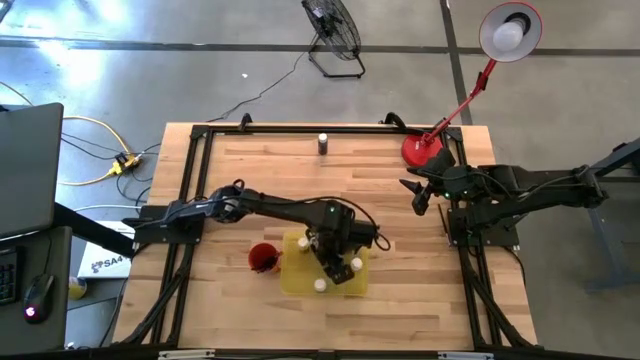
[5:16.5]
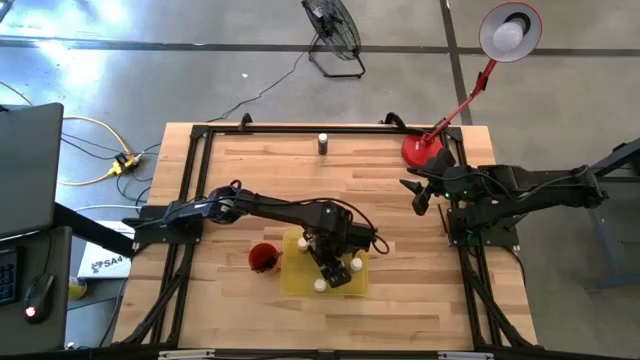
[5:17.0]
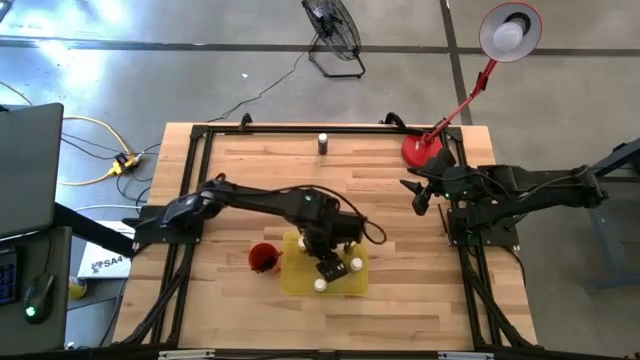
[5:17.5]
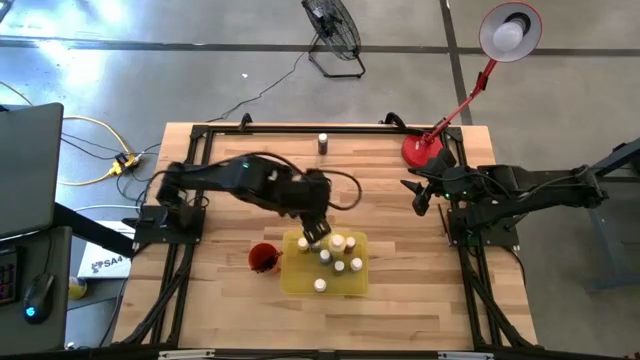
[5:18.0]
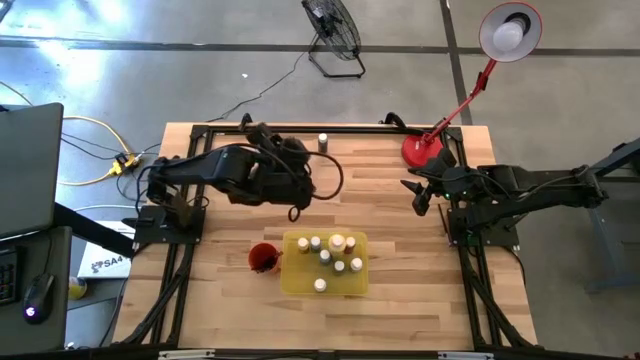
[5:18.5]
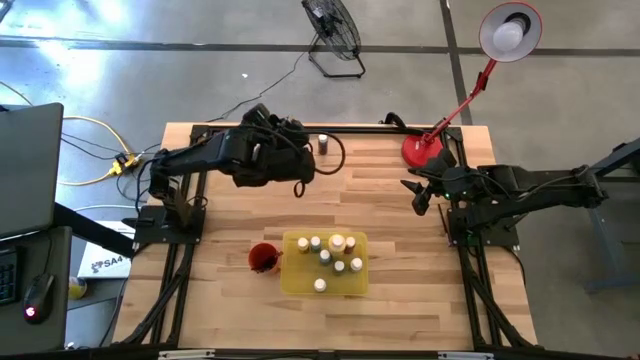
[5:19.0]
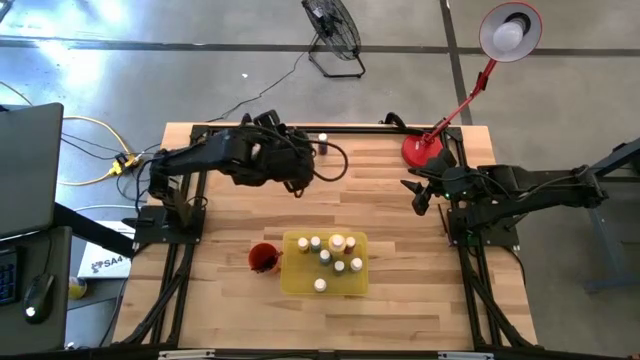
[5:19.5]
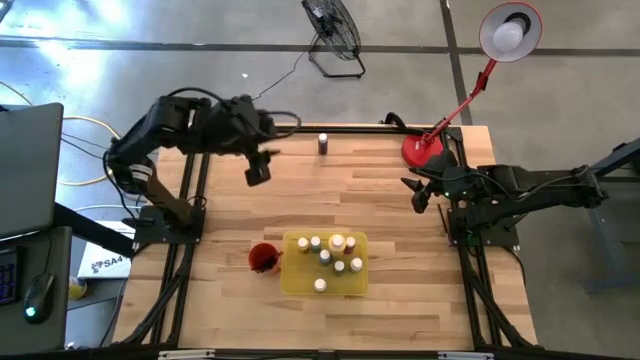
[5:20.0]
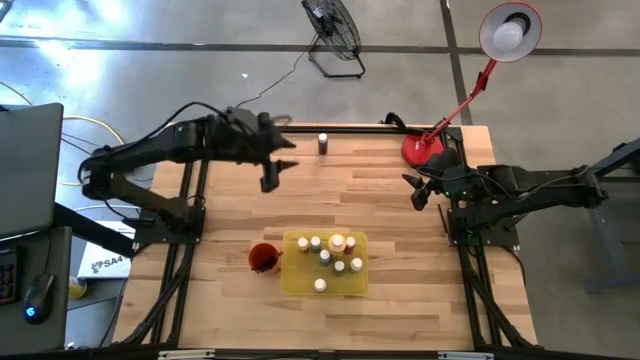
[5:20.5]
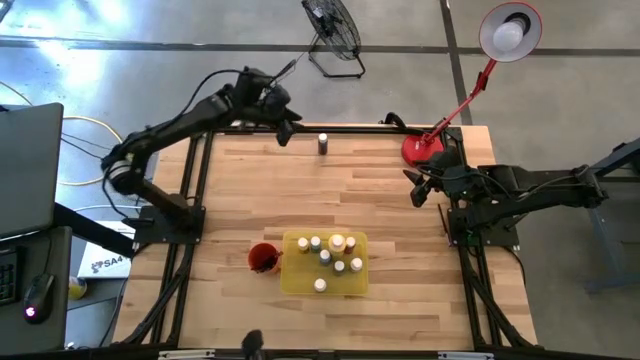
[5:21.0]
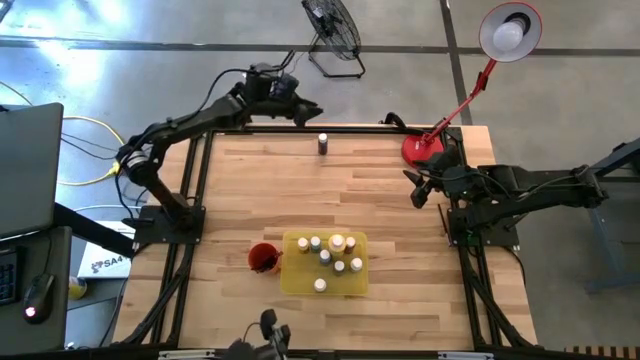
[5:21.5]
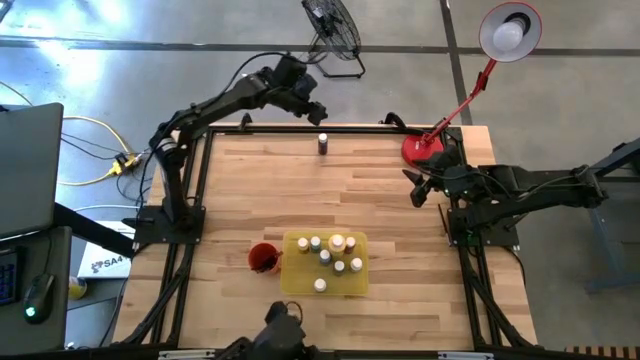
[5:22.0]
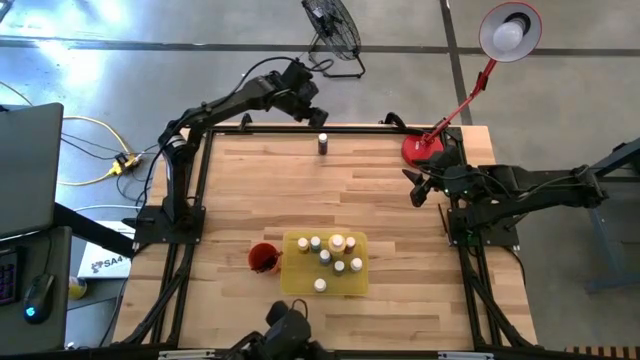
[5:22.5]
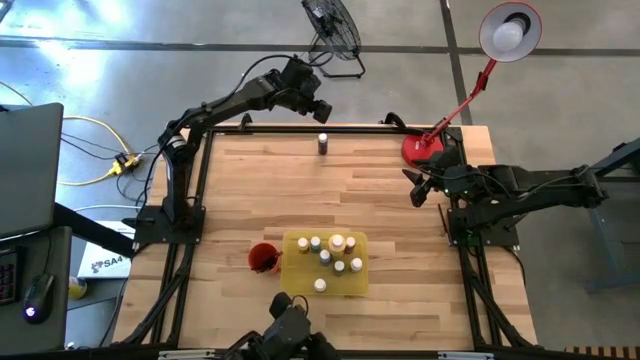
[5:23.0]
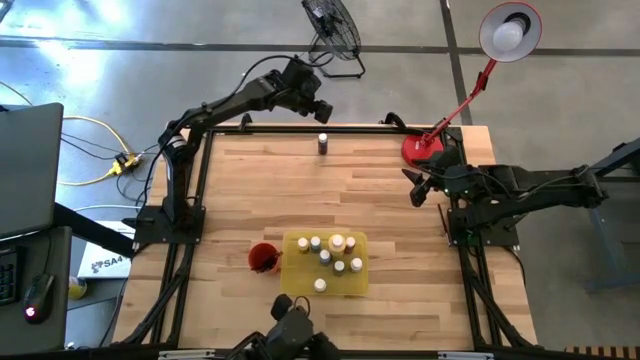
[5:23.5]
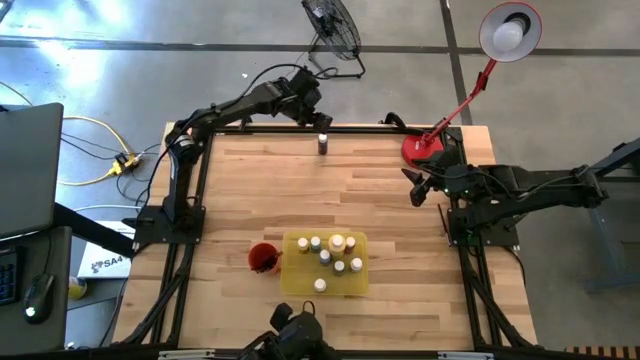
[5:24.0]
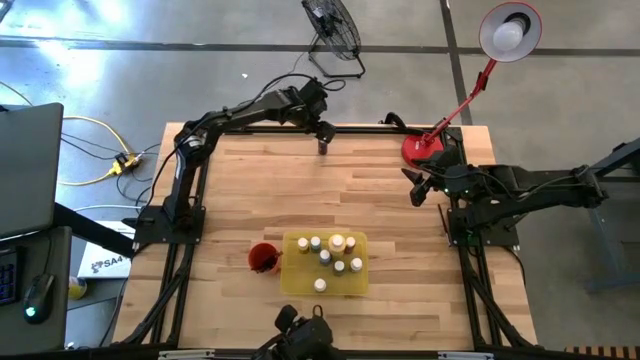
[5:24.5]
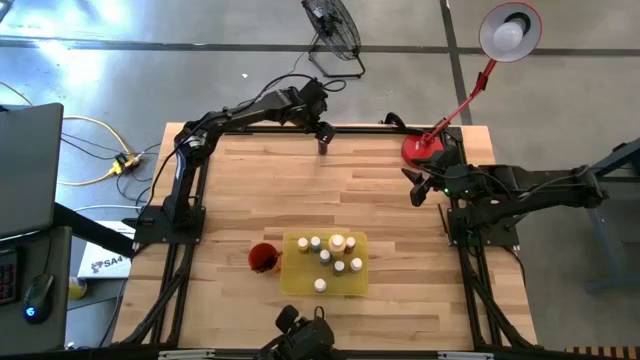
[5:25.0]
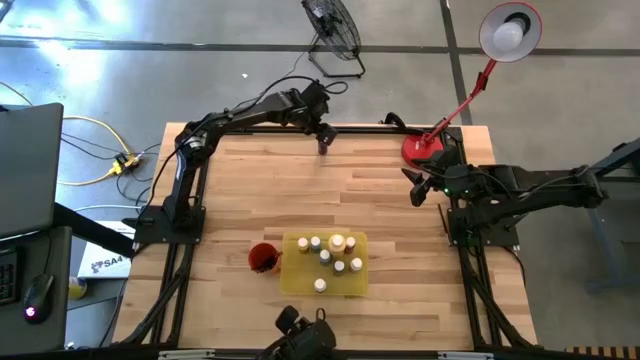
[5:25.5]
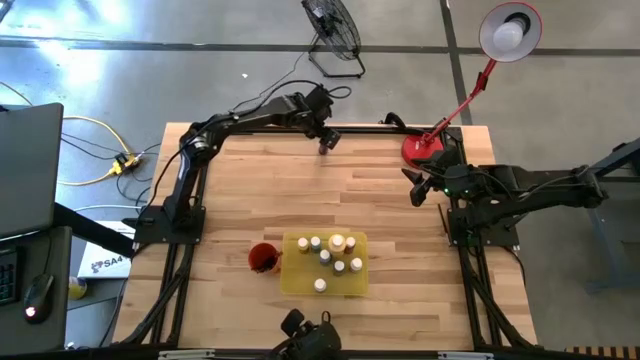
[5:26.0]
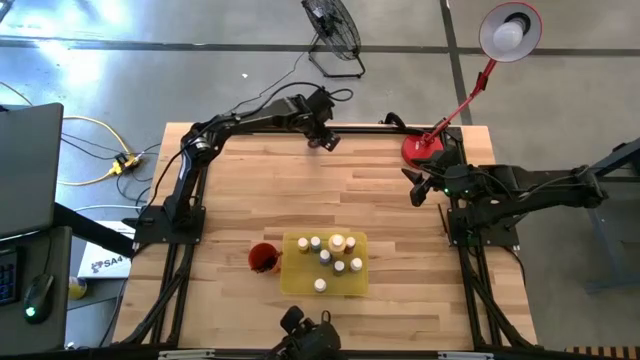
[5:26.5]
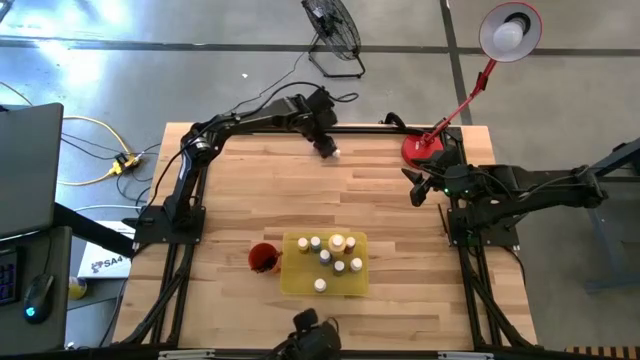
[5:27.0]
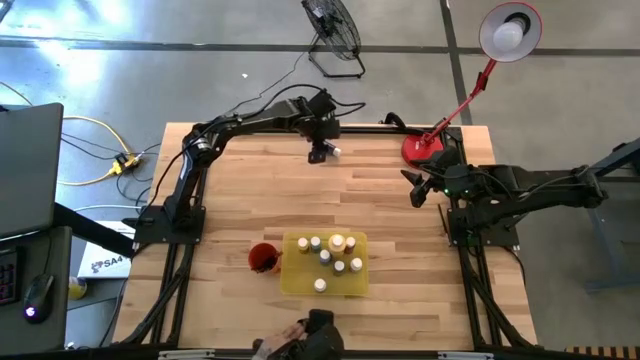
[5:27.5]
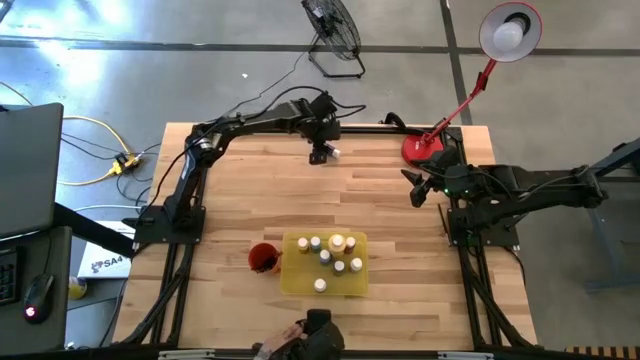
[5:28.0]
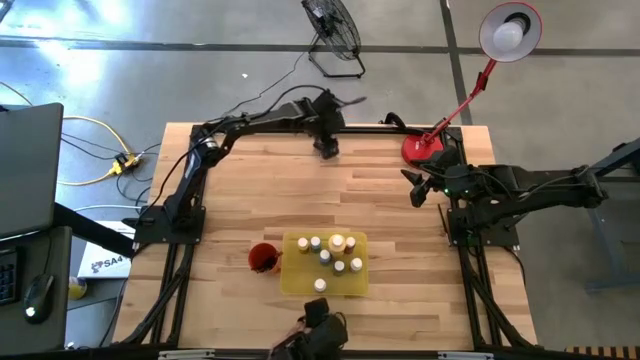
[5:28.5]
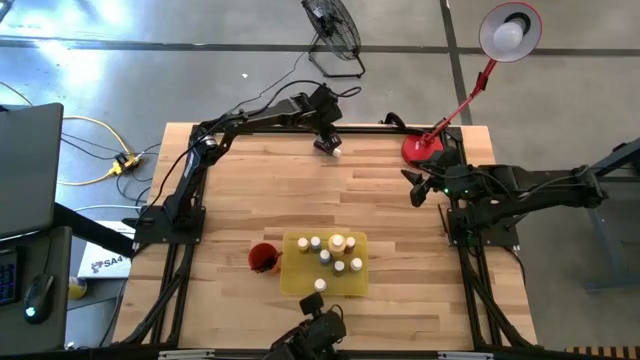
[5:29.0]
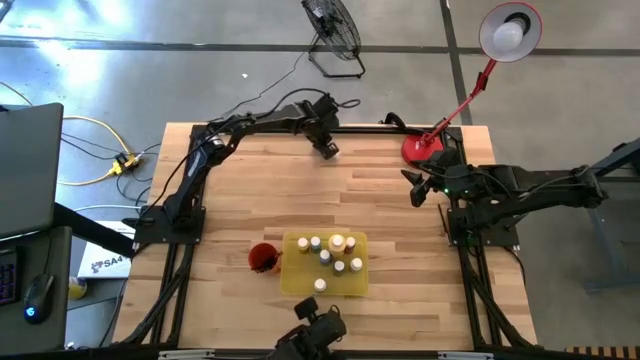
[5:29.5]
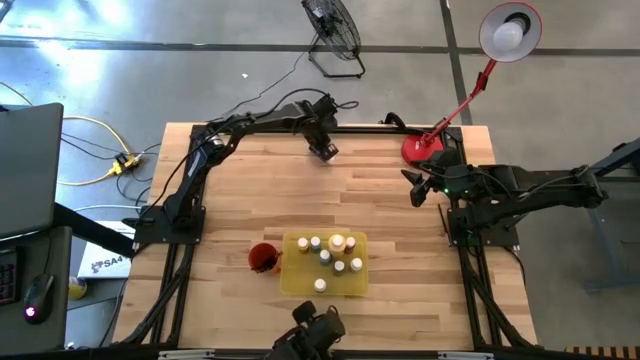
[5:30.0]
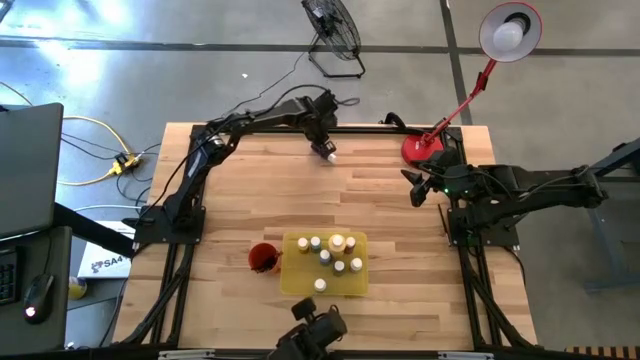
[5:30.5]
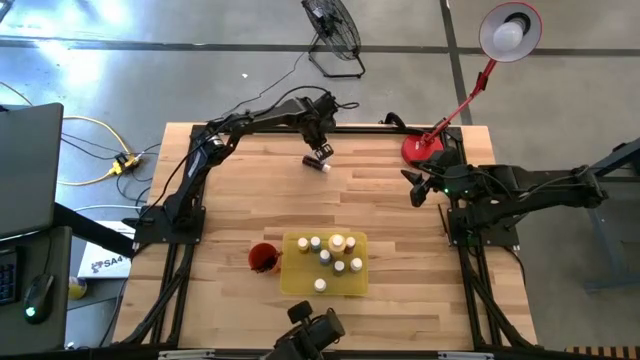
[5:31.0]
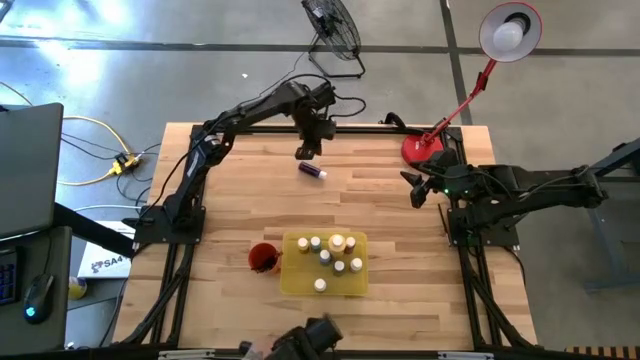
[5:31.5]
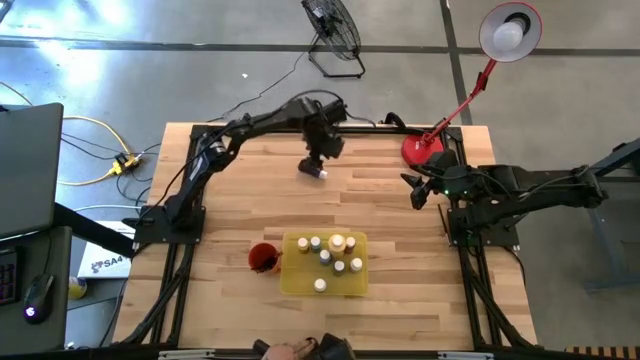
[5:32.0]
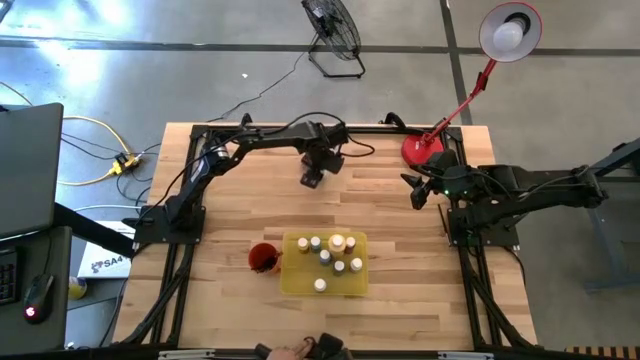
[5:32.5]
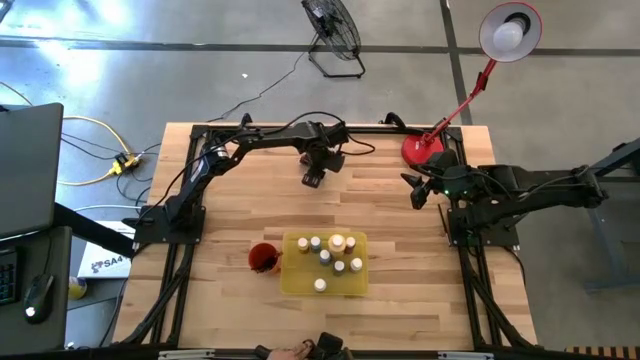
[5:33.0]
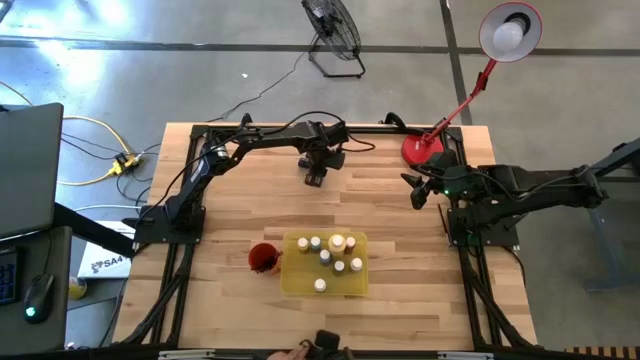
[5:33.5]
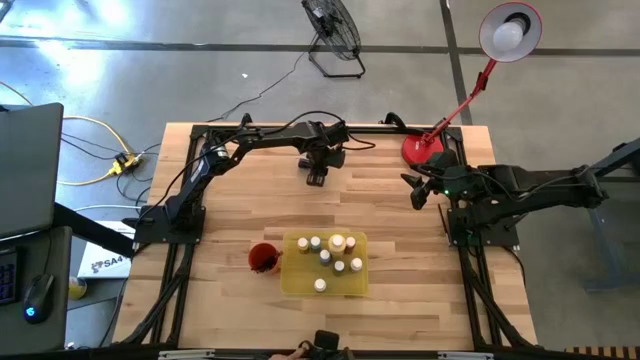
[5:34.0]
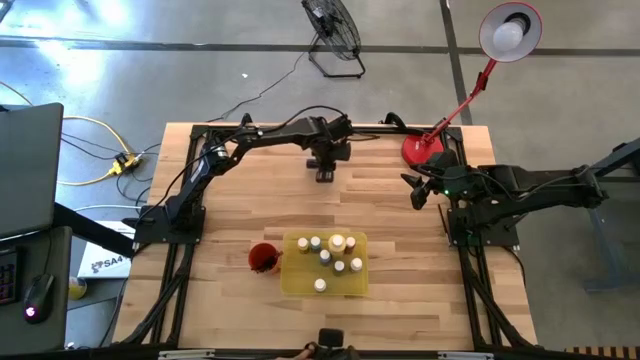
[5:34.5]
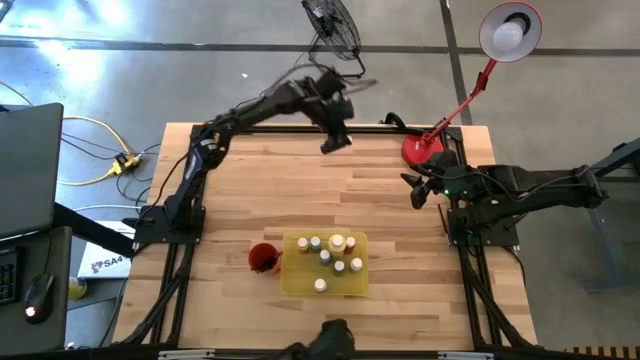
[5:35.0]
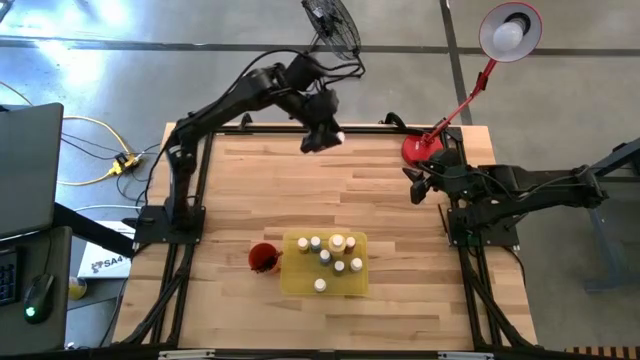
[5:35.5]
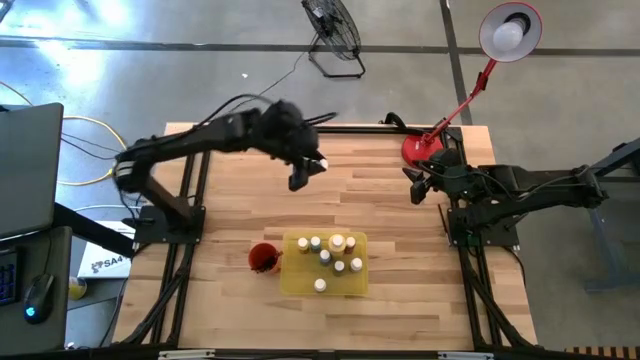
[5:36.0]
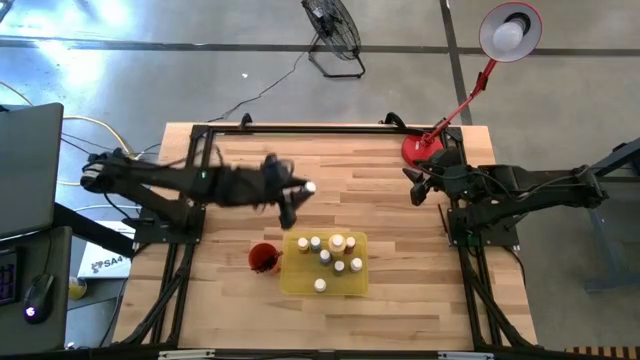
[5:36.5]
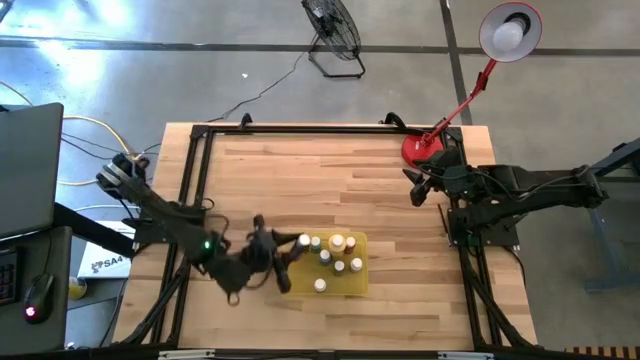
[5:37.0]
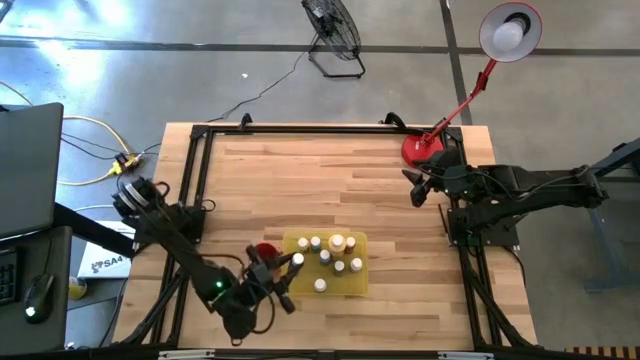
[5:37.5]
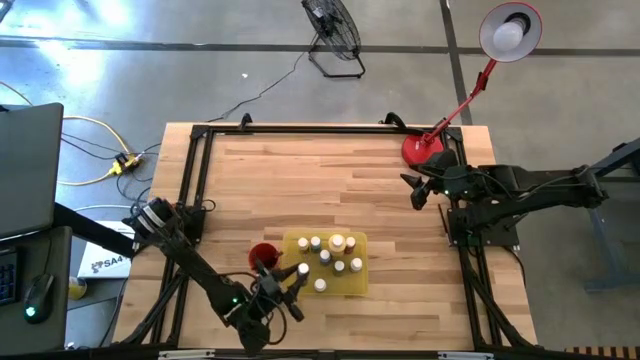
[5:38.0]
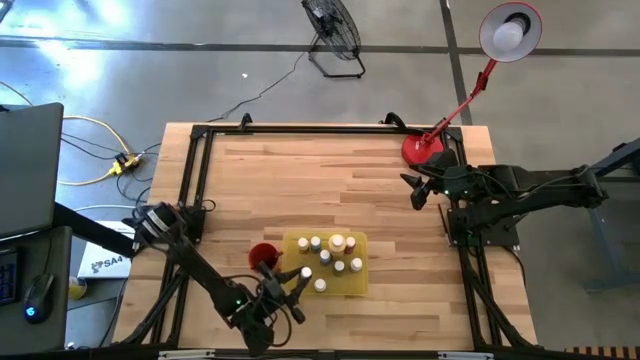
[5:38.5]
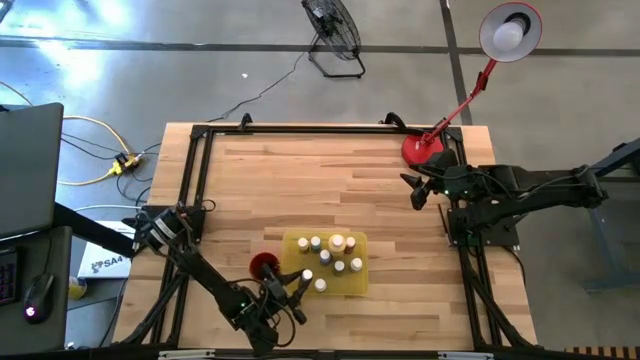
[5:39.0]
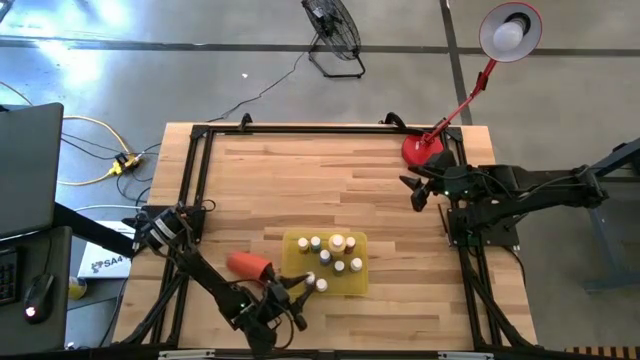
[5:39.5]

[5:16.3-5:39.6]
Task: Pick & Place Paint Supplies
Put the dark blue paint bottle into the yellow bin
